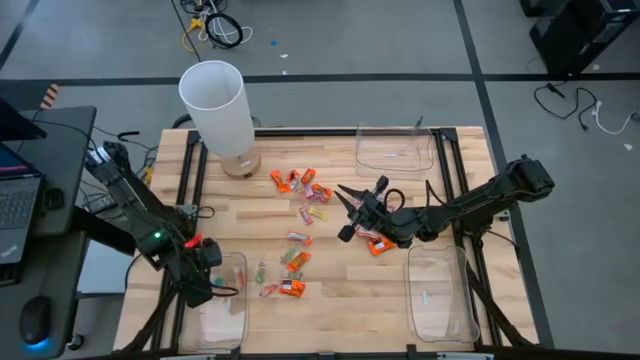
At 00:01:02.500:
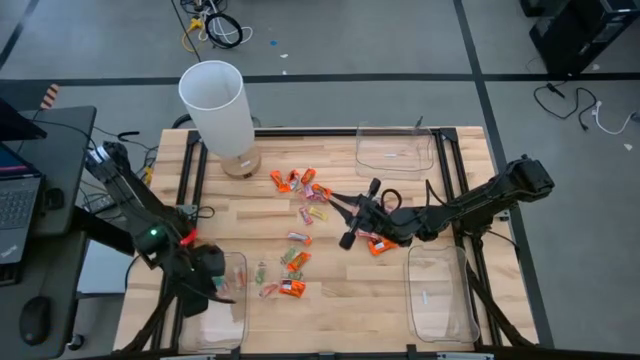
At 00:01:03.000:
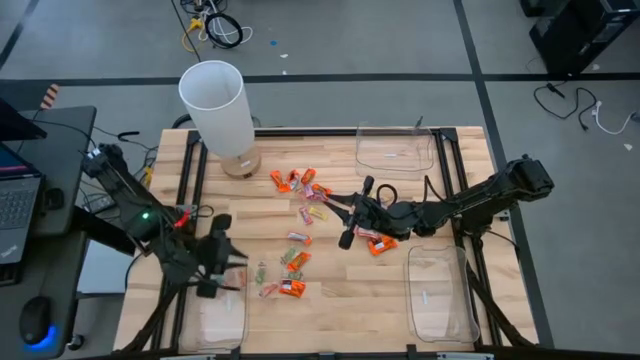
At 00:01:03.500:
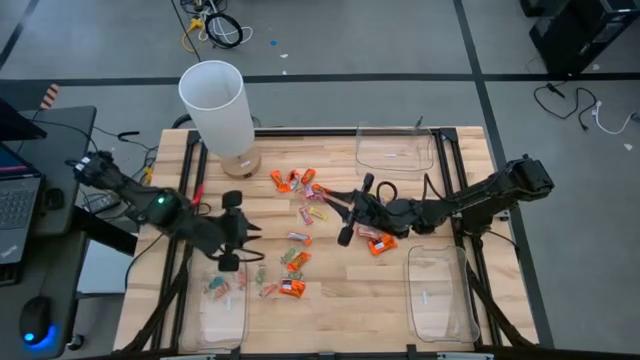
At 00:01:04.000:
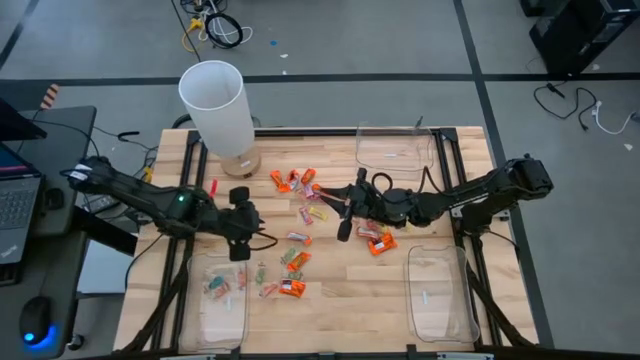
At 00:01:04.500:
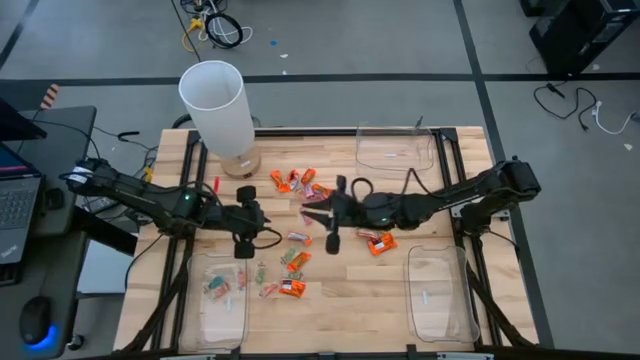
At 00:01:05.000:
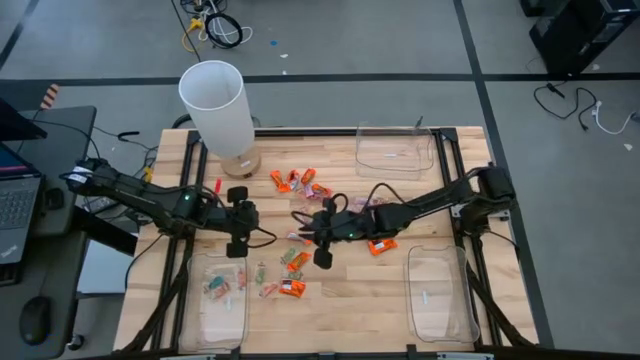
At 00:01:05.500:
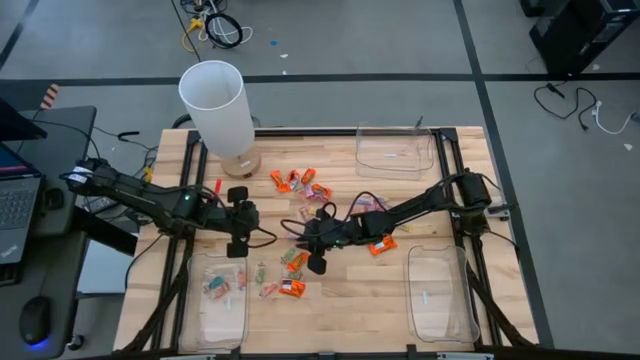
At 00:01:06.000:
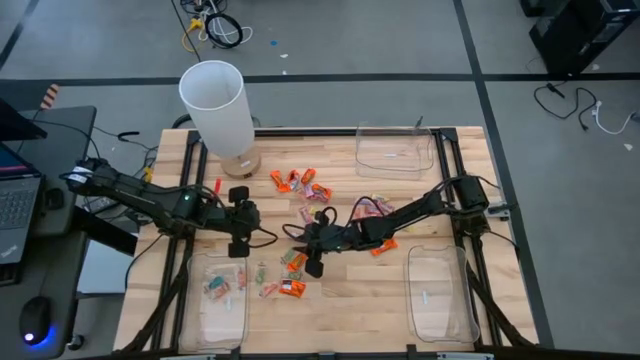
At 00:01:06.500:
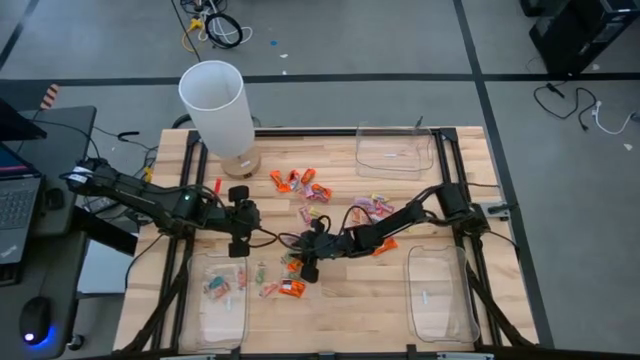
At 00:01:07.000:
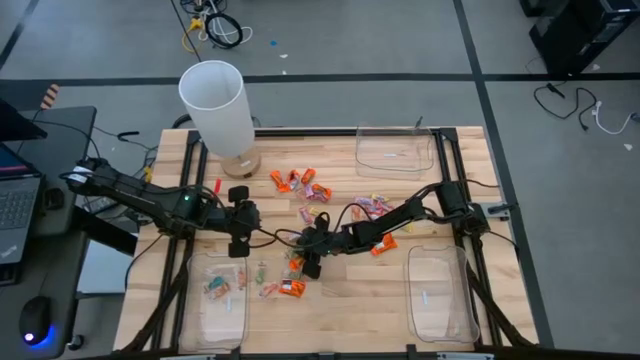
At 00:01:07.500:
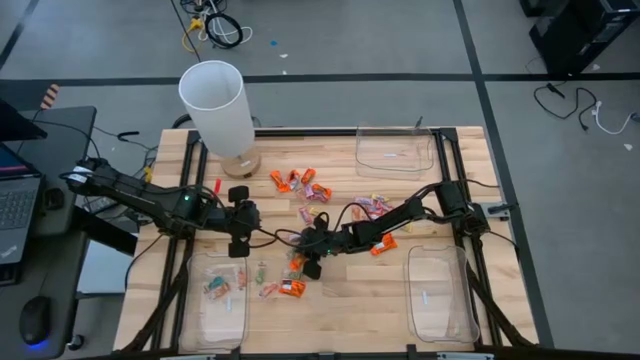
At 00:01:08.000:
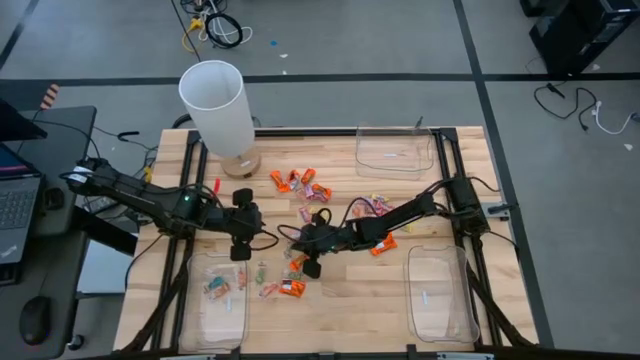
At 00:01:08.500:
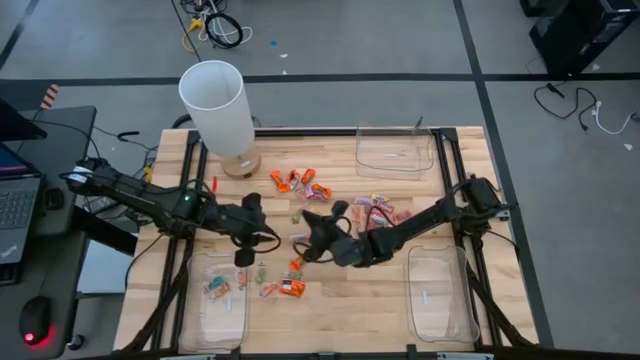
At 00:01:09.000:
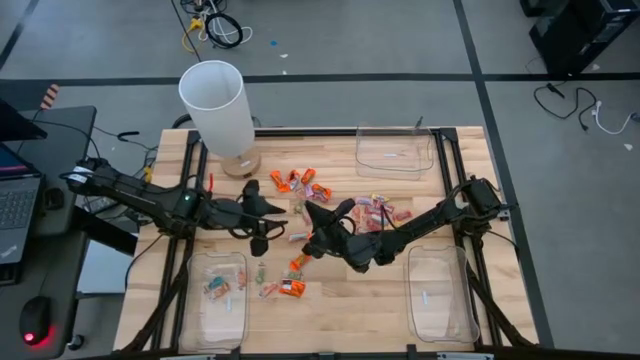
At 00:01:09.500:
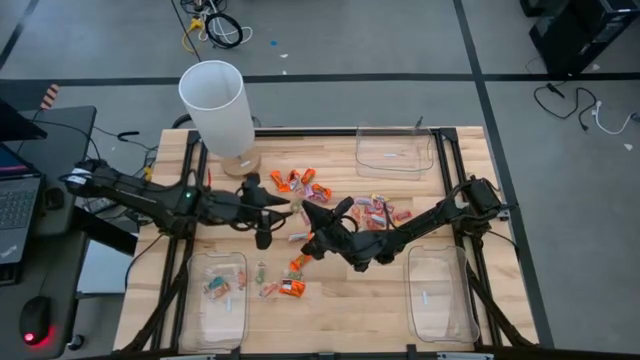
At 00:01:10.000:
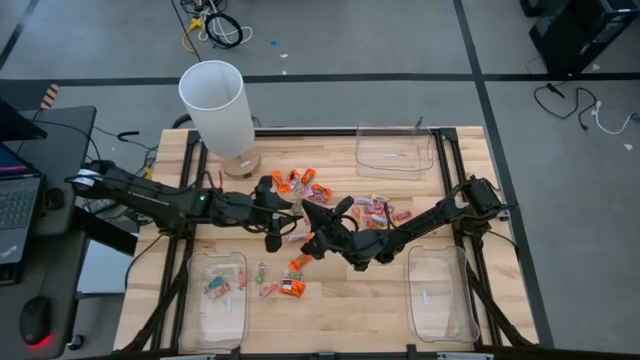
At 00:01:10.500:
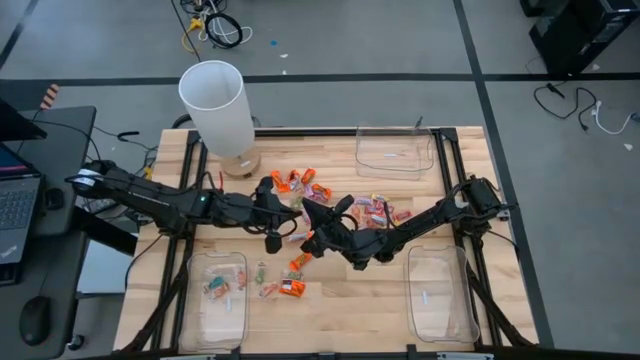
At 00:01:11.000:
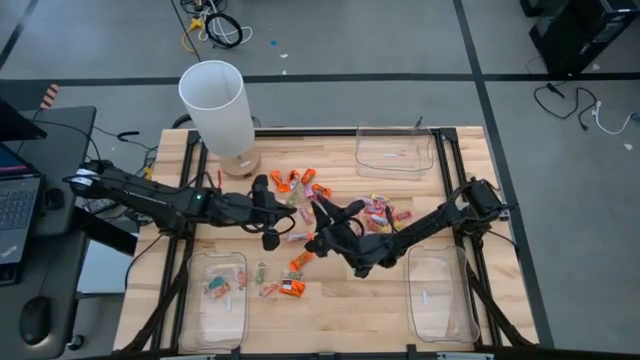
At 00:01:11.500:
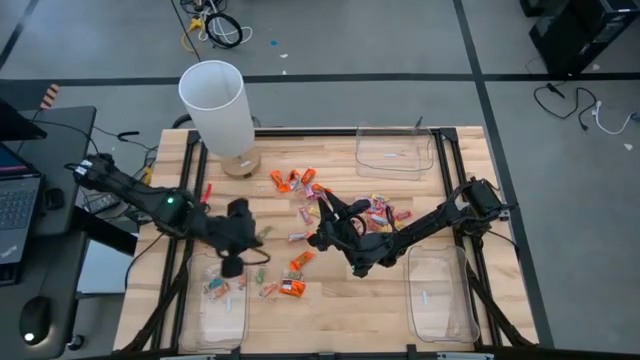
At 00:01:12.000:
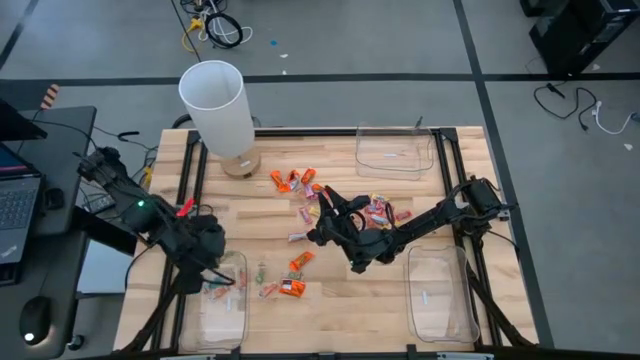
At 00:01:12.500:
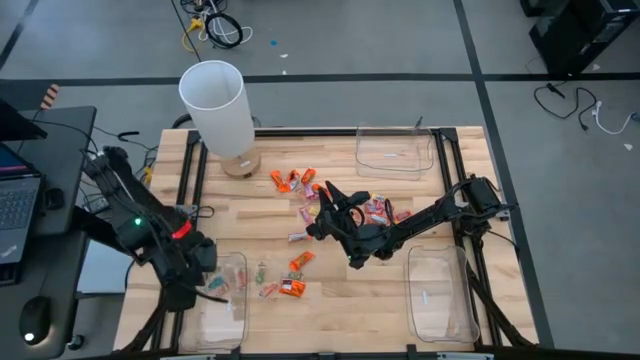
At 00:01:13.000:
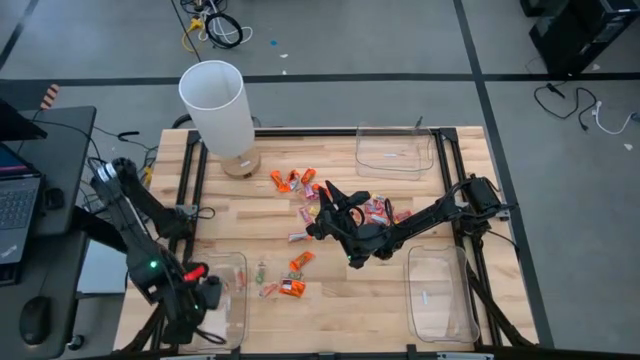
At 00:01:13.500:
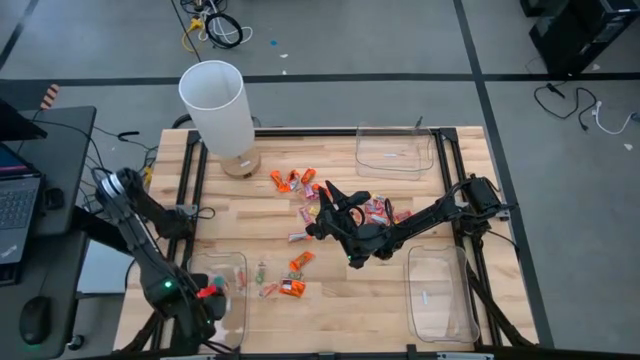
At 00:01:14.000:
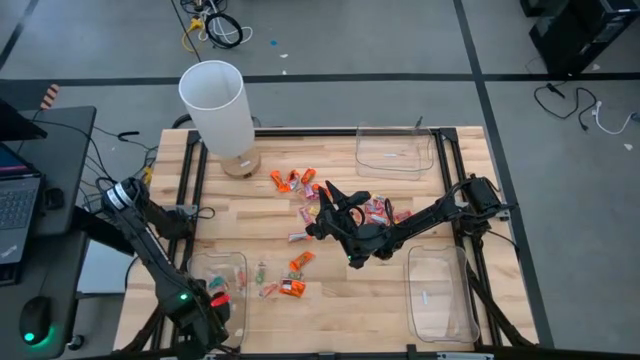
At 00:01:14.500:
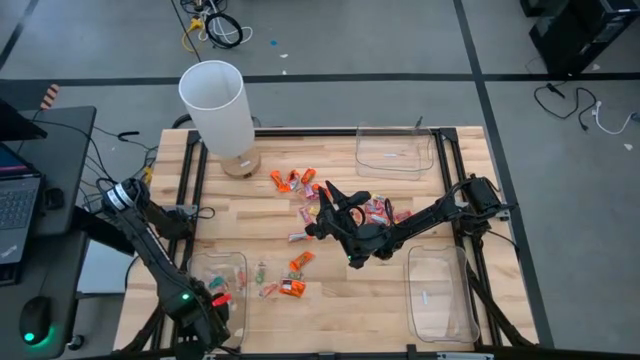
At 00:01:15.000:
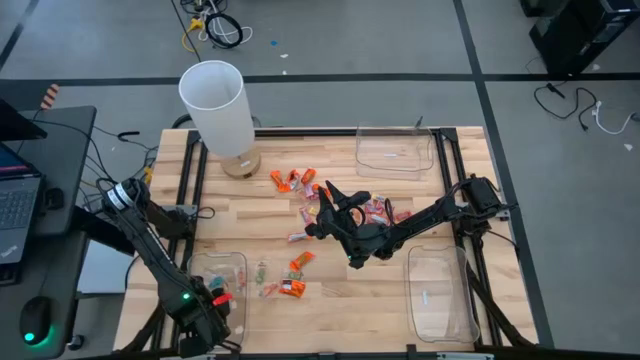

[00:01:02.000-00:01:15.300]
Task: Sort candy
Put the green gummy into the bottom left transparent bin

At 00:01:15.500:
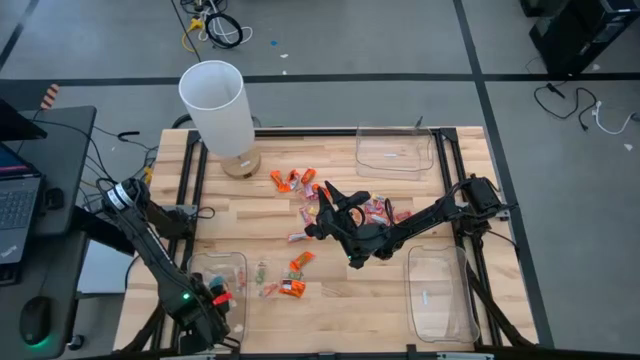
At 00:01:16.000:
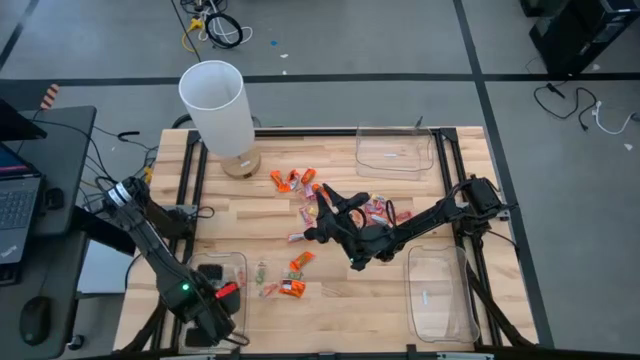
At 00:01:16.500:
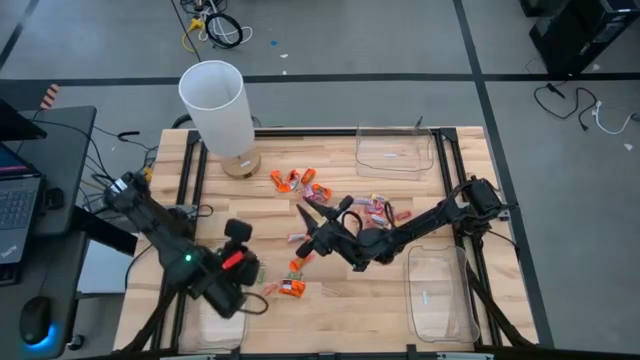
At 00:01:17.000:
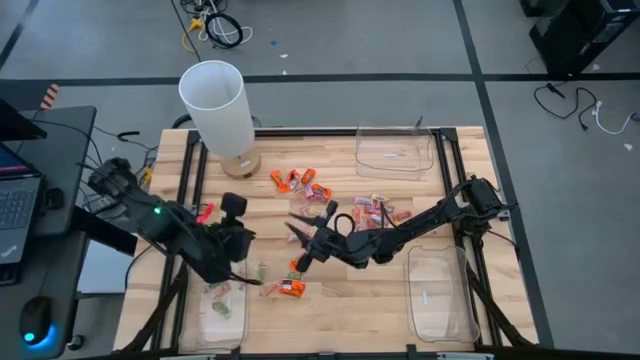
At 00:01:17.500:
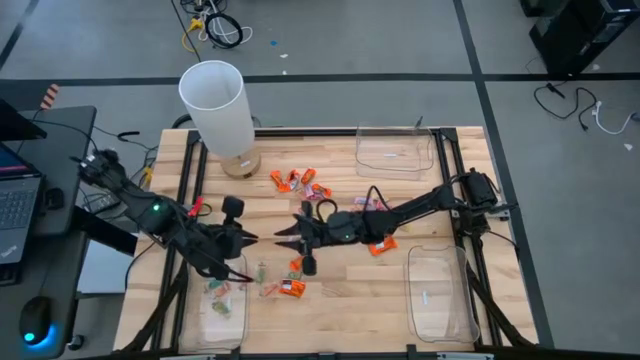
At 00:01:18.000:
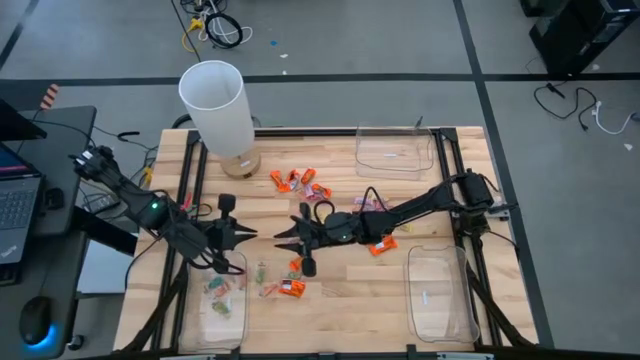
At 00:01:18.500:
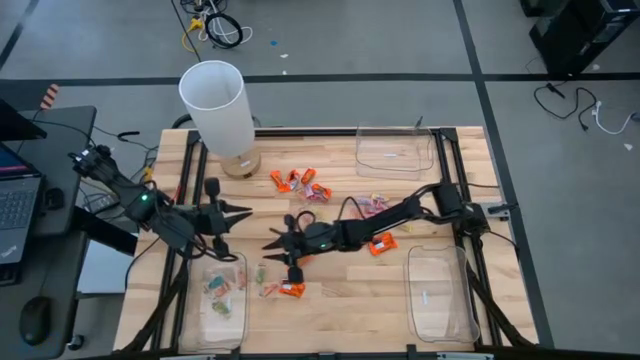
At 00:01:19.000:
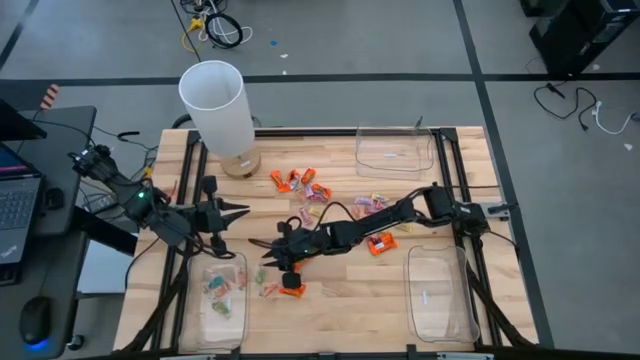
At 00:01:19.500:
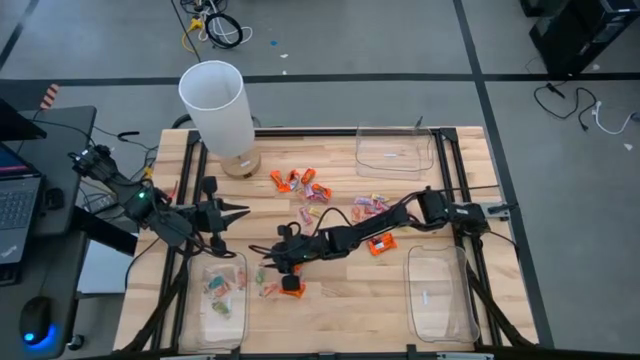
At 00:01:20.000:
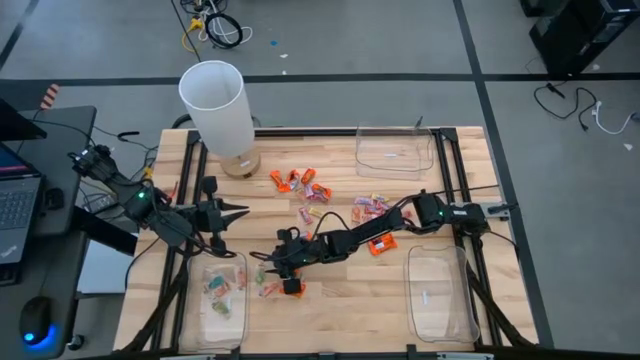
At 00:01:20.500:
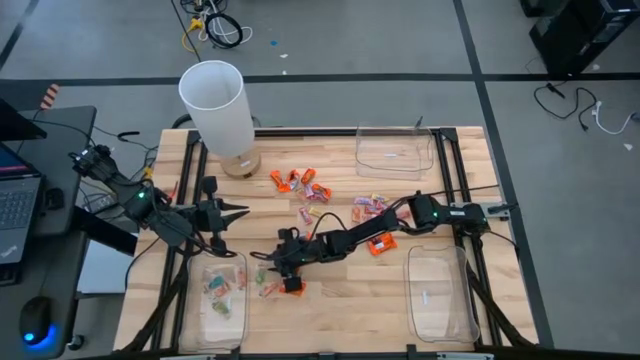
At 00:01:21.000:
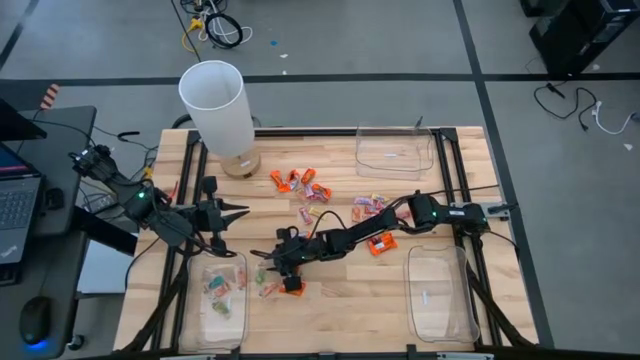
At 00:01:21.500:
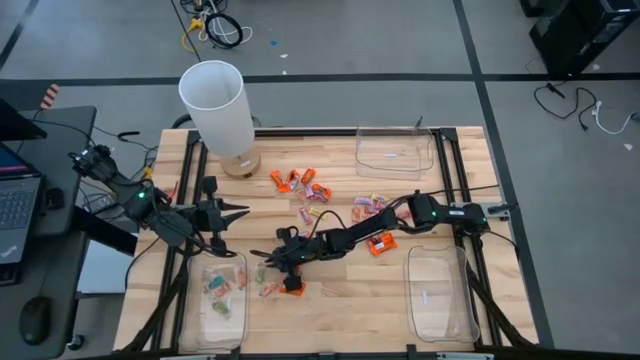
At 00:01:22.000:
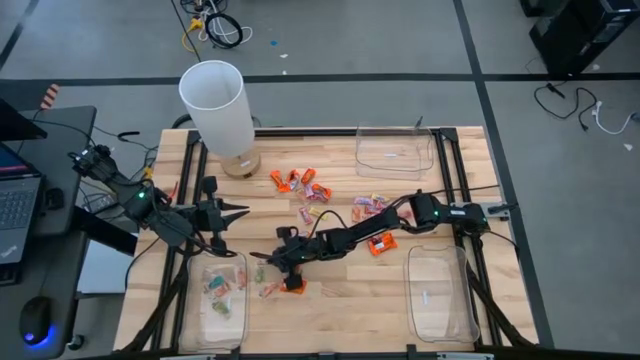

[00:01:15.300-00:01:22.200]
Put the green gummy into the bottom left transparent bin

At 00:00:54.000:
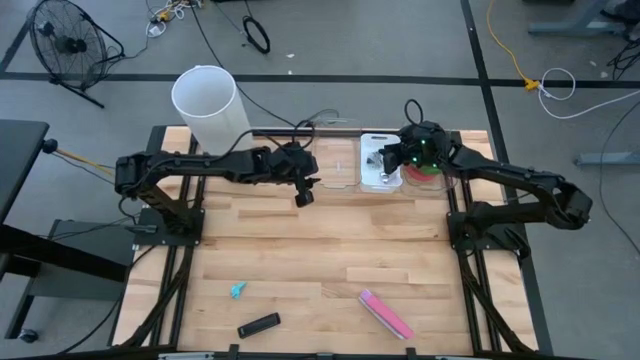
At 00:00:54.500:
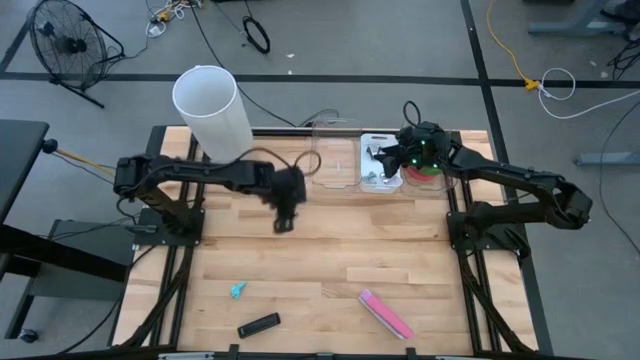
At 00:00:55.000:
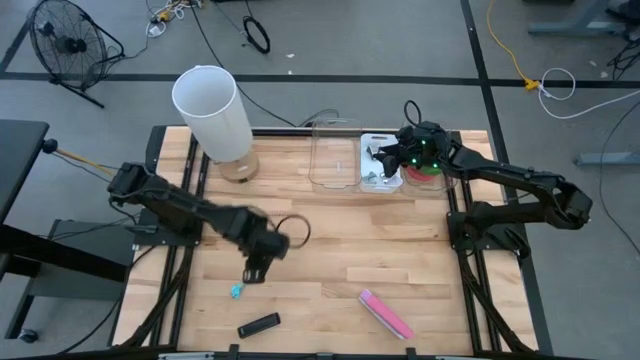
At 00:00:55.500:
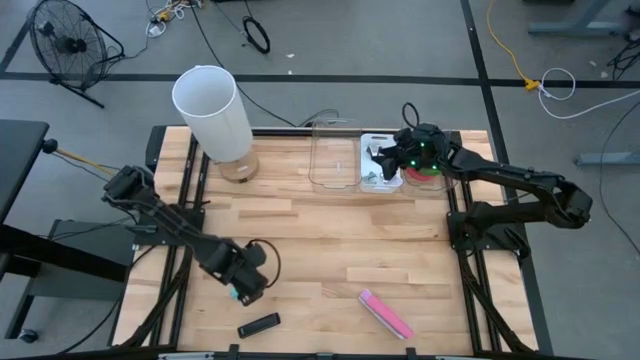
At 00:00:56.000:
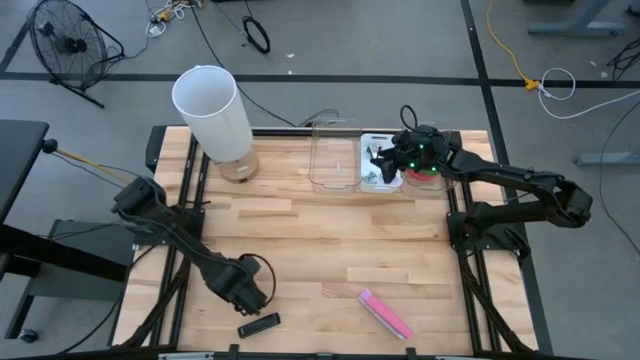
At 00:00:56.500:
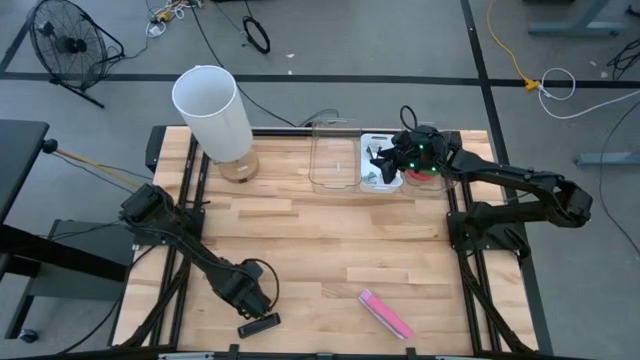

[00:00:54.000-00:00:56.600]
Task: Pick and place Stapler, Stapler remover, tape
Put the light blue staple remover into the white bin
